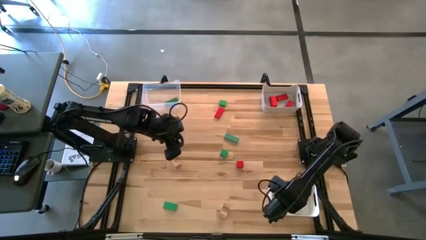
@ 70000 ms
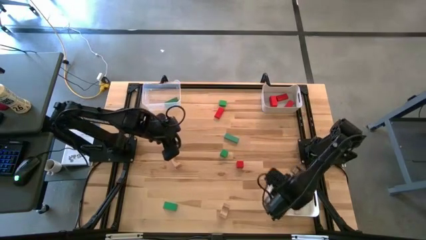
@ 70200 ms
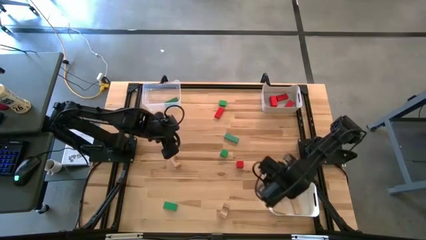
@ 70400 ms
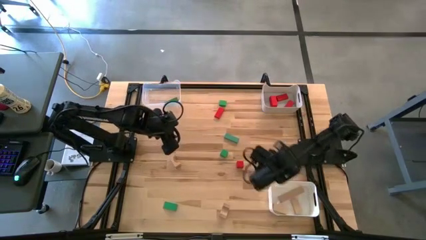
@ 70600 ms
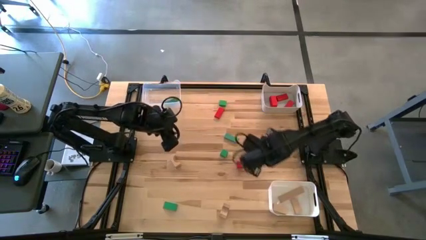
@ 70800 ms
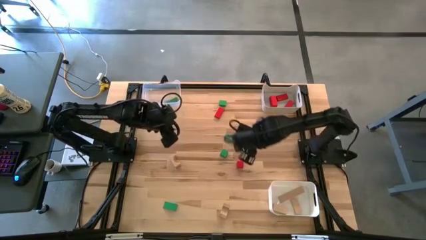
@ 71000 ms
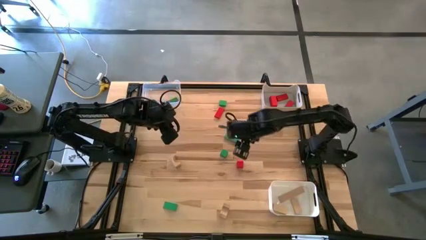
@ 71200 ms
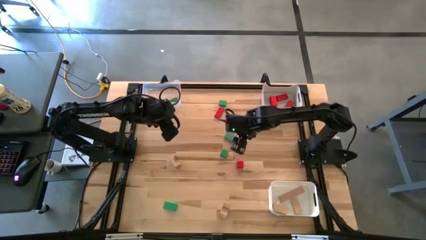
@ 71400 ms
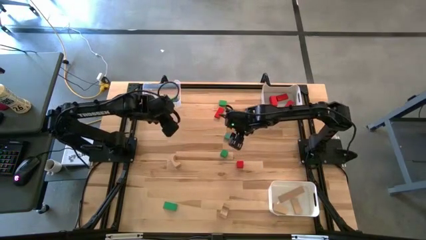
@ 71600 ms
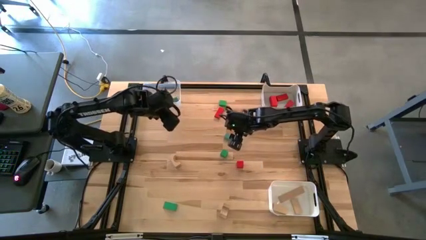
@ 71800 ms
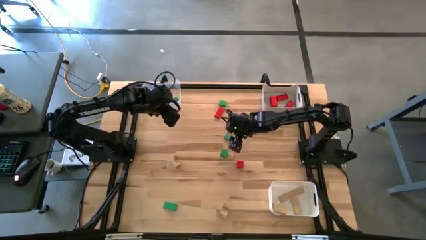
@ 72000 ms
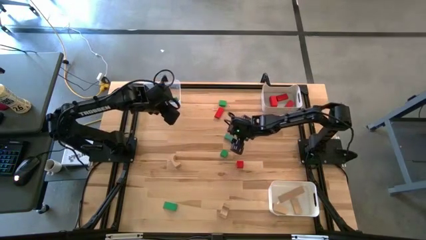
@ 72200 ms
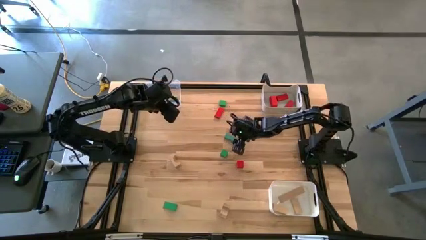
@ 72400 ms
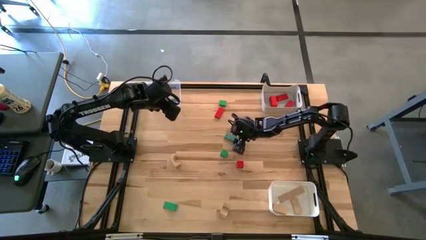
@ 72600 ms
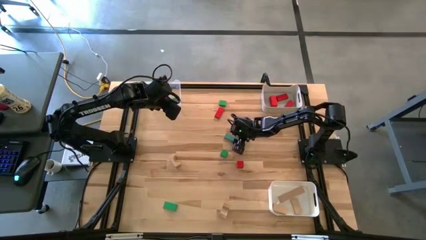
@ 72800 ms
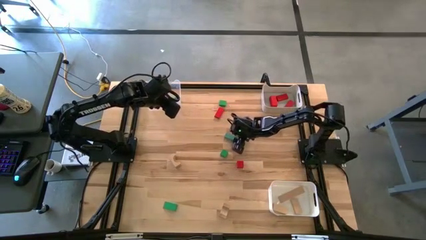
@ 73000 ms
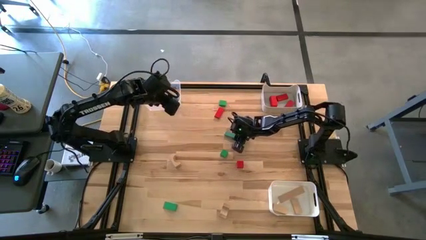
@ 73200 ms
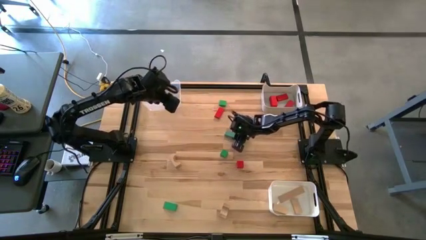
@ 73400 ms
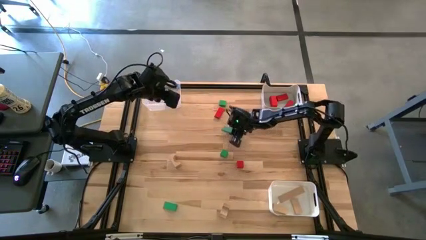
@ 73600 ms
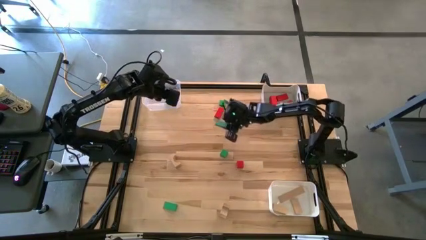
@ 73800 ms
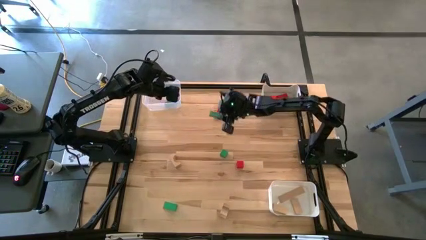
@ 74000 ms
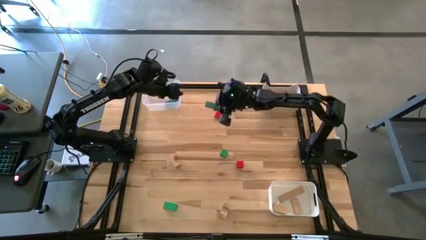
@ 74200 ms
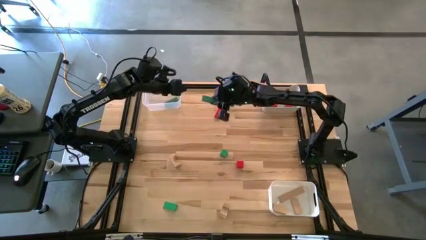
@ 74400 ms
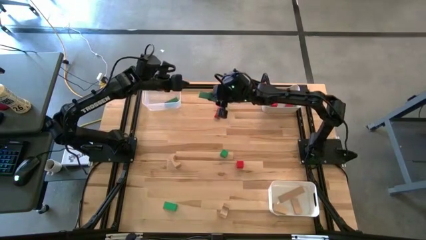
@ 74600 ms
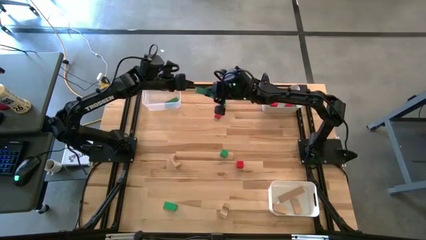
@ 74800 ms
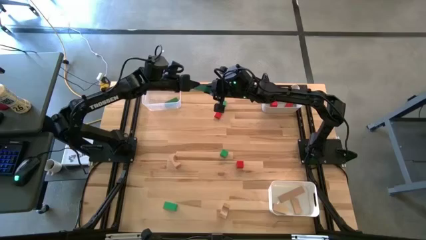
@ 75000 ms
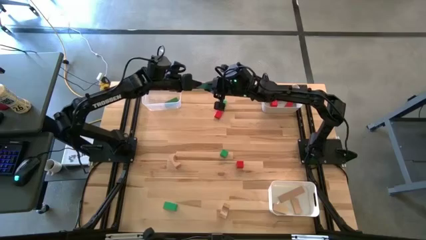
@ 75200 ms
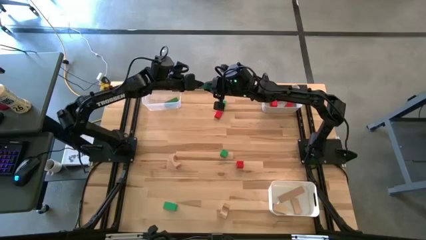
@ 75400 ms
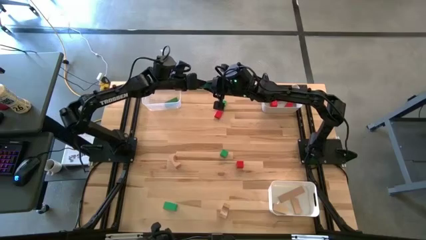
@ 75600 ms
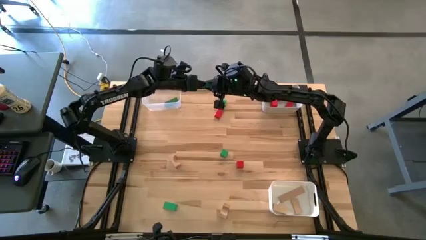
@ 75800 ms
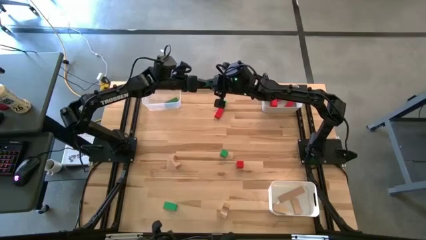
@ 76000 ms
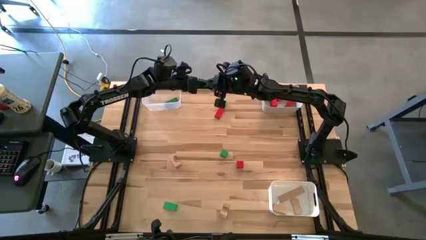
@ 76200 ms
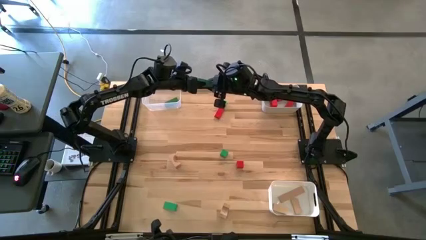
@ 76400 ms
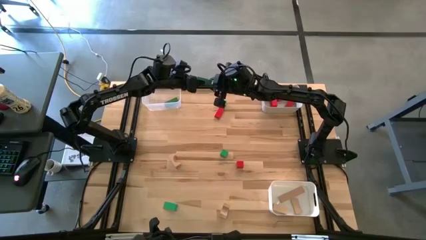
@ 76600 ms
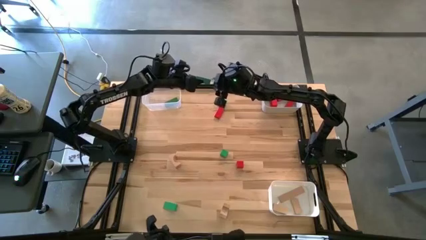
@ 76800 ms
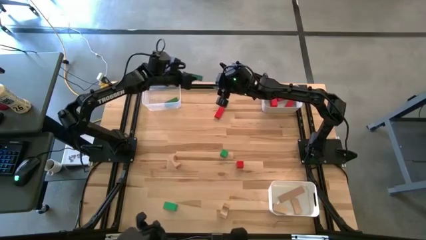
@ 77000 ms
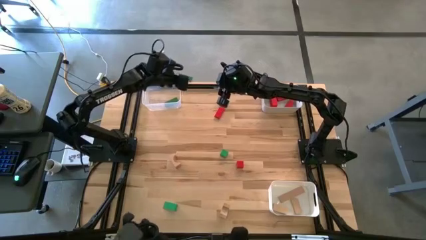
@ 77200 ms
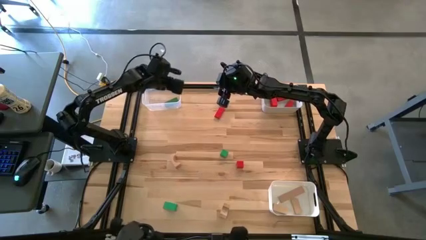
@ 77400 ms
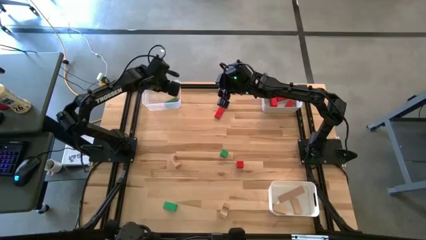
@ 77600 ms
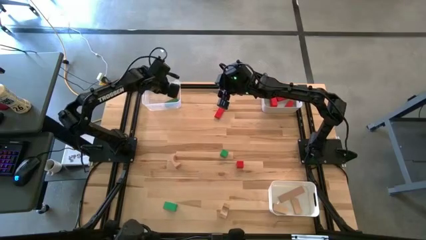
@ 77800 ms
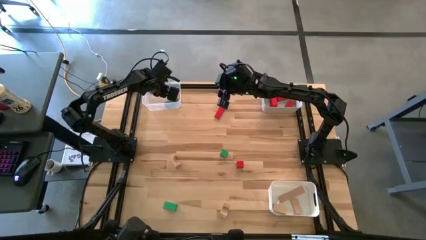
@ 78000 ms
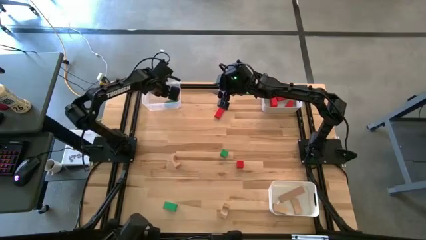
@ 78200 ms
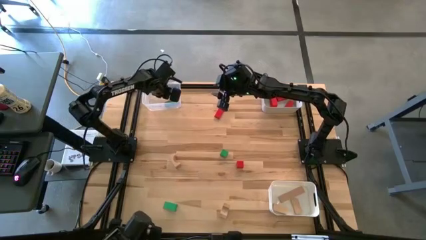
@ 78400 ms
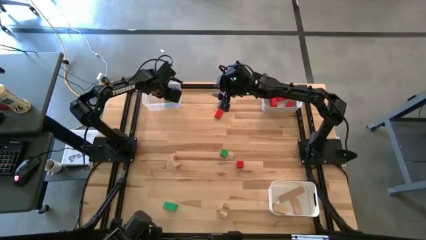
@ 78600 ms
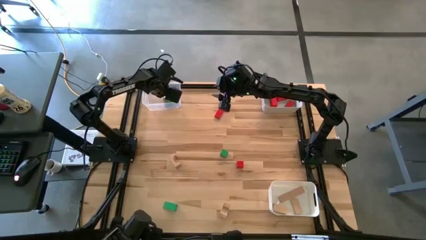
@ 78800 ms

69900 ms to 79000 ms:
Task: Sort & place blocks by color
Put the green block into the transparent bin

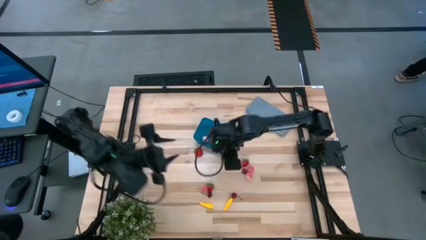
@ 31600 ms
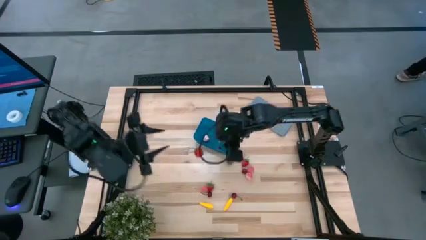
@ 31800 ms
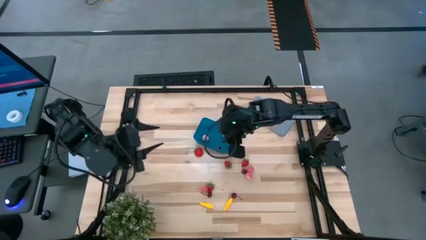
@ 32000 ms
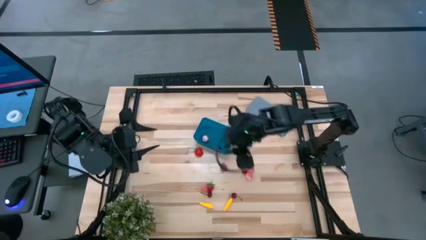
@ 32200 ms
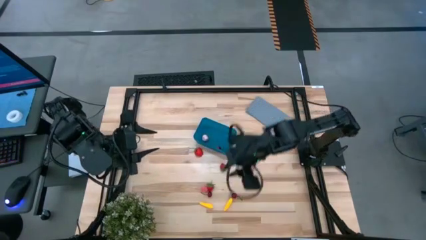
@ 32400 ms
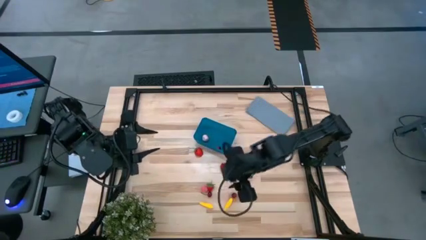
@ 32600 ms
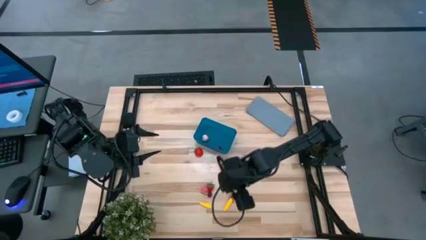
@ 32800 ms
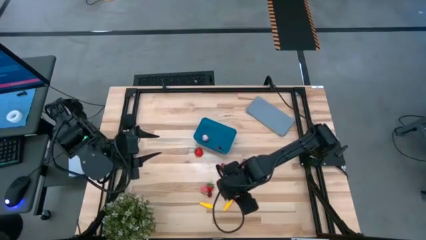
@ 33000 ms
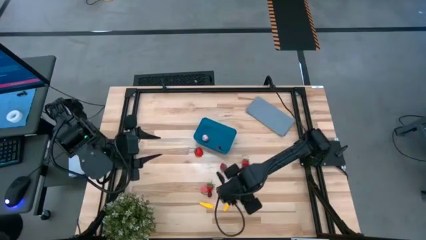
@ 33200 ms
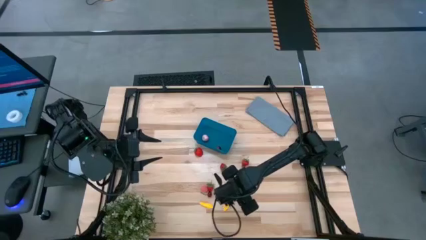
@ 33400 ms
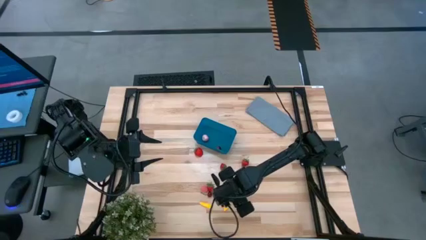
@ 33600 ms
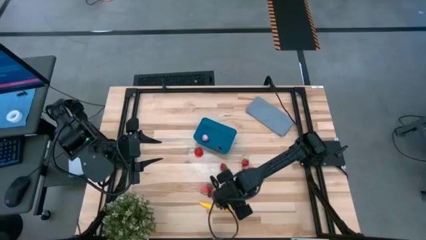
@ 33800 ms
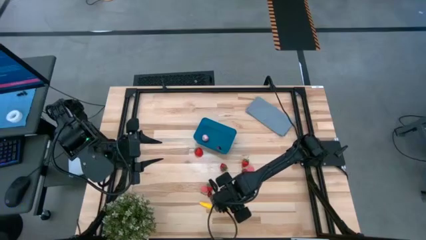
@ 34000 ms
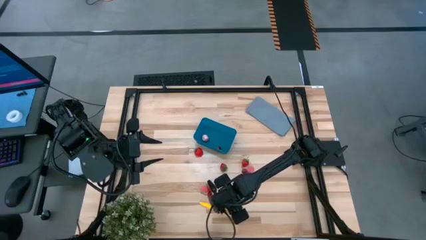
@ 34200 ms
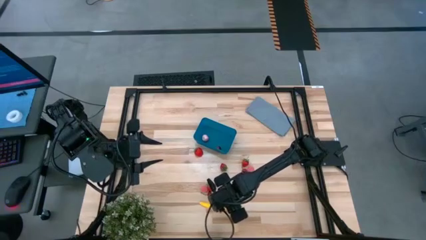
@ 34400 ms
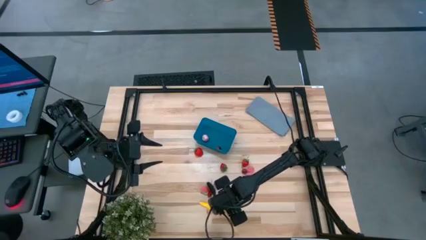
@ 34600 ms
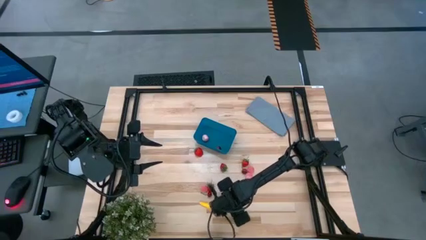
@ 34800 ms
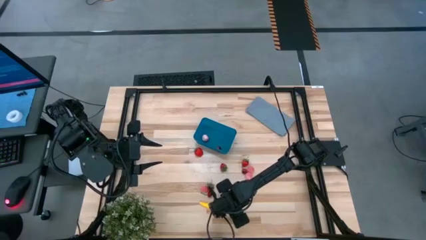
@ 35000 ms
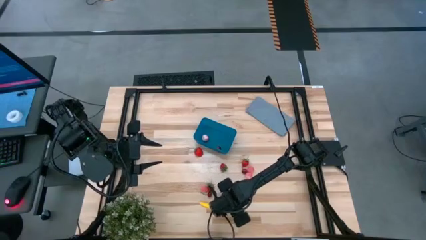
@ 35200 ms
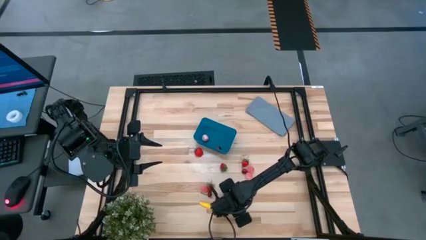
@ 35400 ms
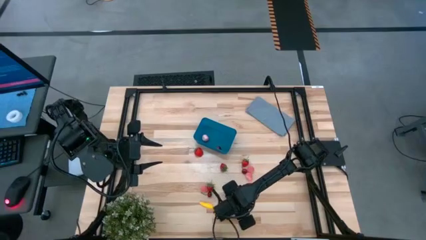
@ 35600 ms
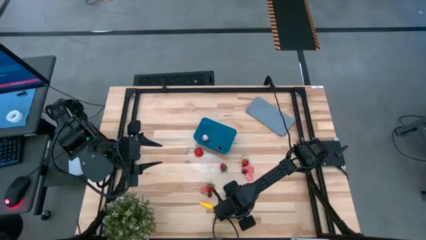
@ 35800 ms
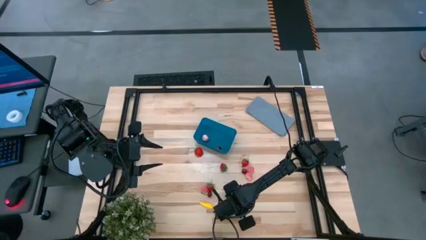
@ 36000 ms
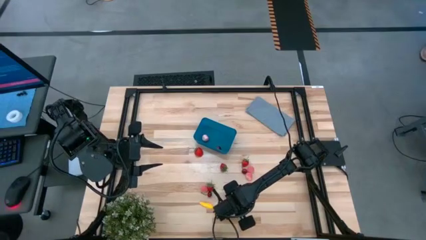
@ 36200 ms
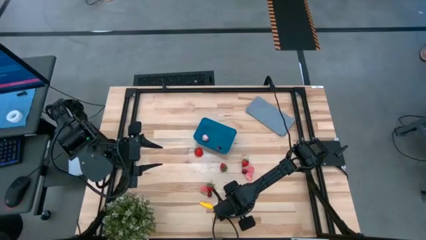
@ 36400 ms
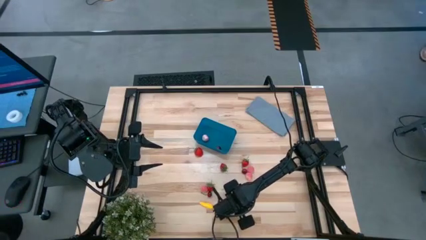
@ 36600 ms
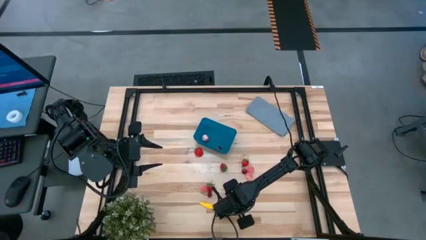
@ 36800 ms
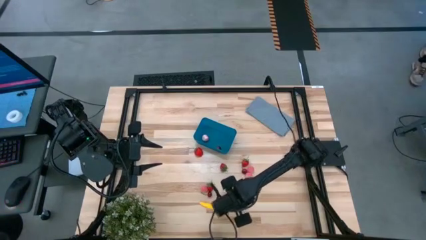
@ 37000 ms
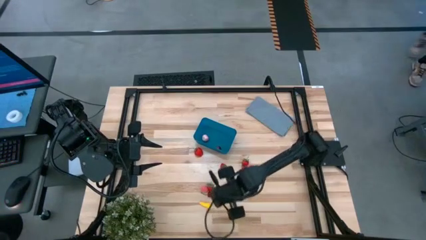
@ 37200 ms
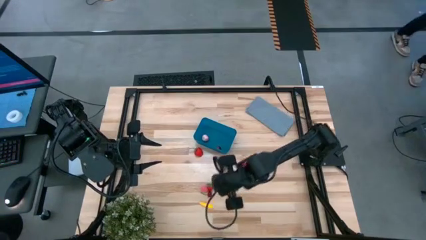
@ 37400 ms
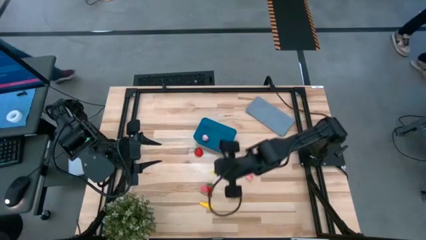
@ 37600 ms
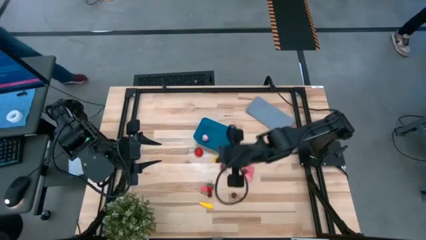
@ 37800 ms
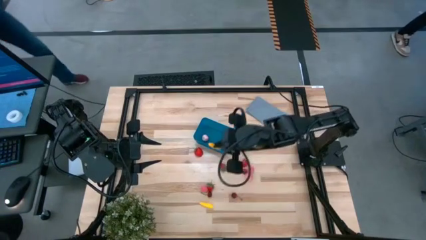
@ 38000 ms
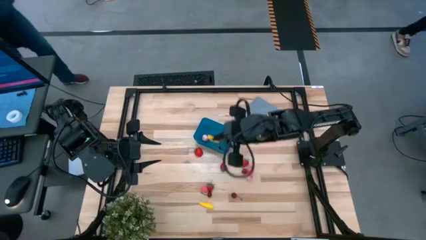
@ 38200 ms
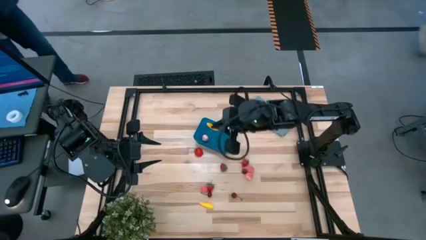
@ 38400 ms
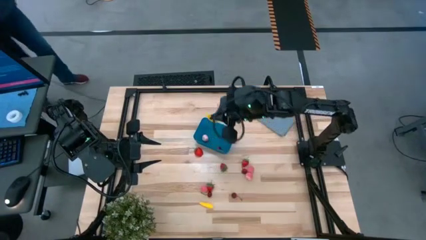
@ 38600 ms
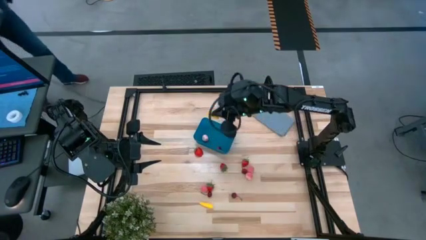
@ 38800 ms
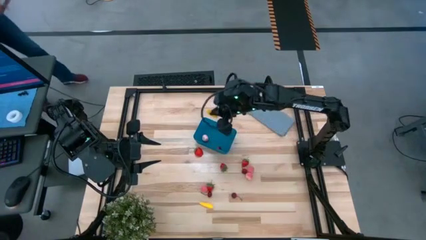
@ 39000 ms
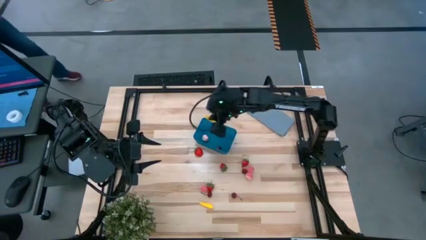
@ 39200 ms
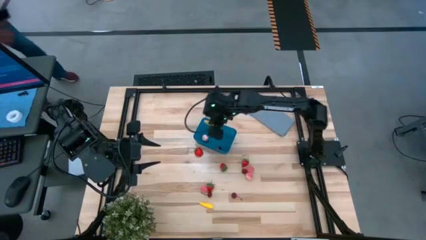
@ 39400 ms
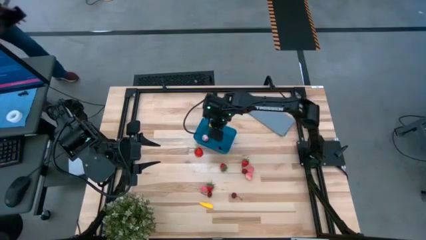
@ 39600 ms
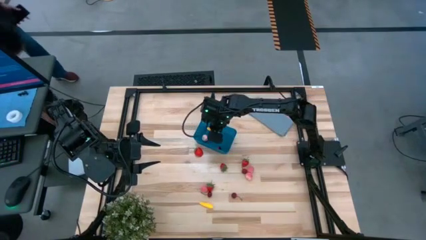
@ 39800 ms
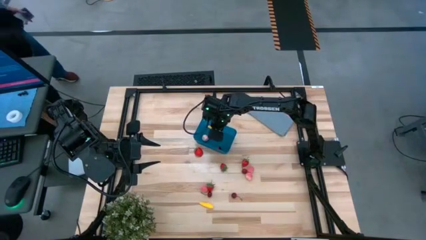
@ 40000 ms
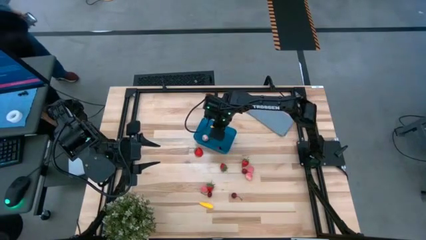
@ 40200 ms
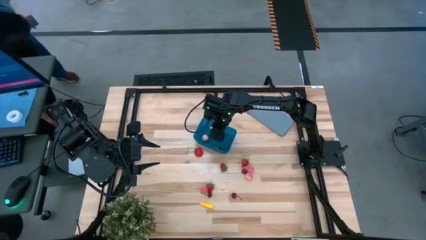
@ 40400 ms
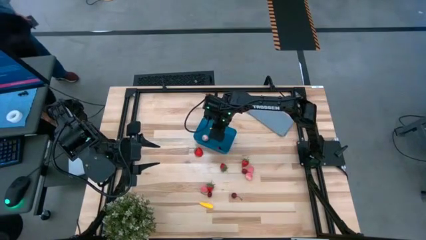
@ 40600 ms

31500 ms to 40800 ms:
Task: Pick and placing Produce into tupperware
Put the yellow corn into the blue bin
